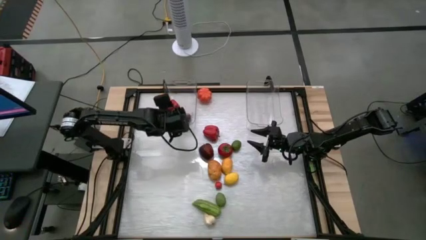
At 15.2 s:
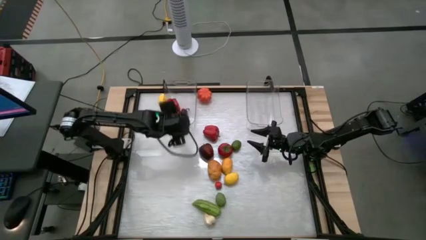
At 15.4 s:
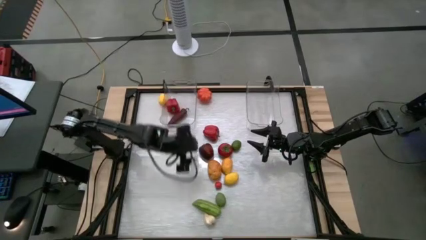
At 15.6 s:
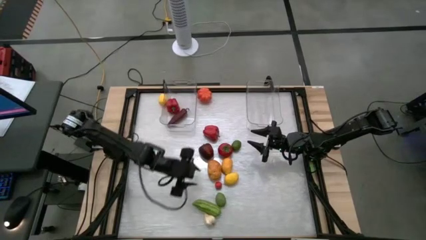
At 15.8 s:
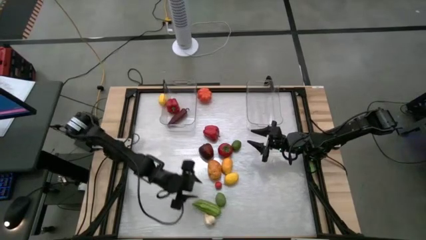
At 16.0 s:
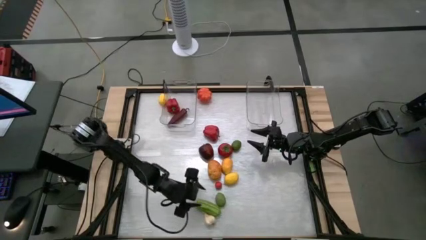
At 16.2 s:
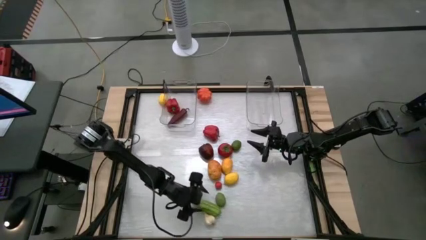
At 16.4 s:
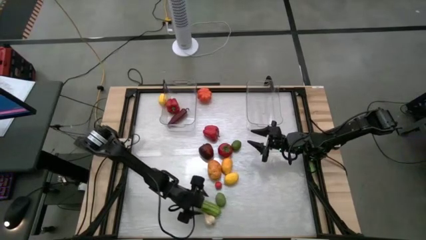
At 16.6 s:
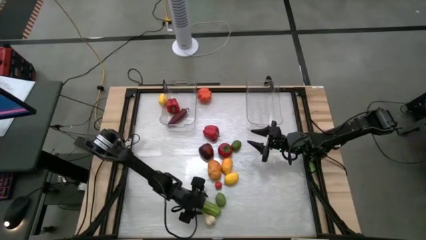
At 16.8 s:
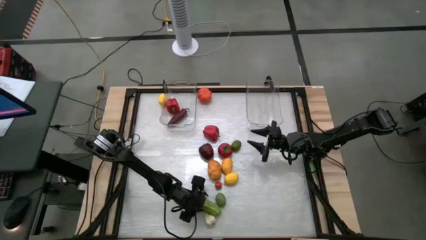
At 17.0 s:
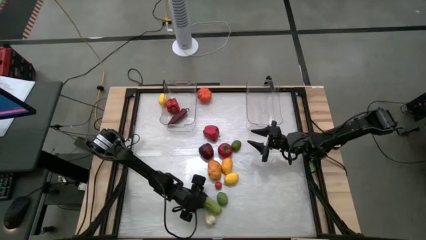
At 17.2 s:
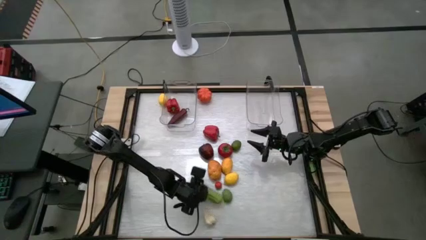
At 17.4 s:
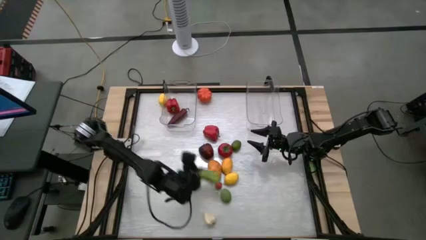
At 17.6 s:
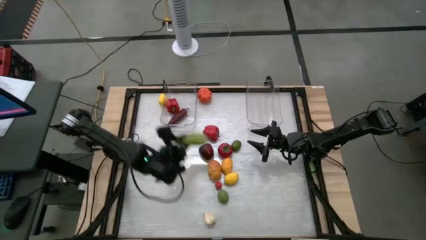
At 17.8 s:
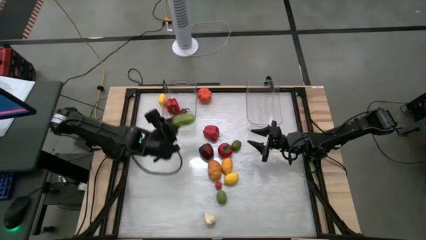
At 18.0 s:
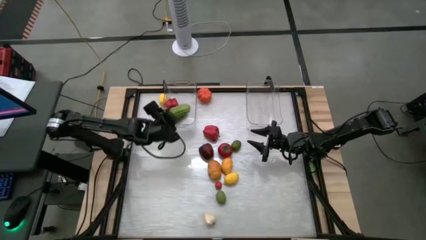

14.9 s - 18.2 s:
Task: Sort produce into baskets
Put the cucumber into the left transparent bin

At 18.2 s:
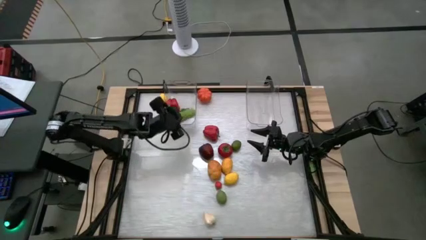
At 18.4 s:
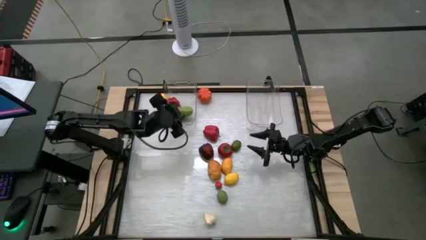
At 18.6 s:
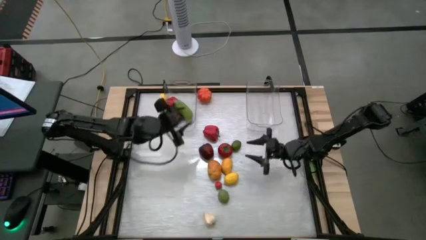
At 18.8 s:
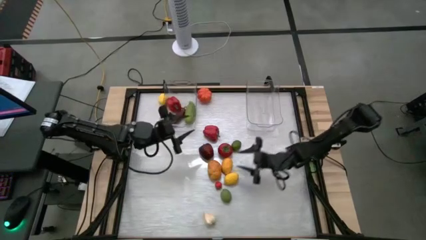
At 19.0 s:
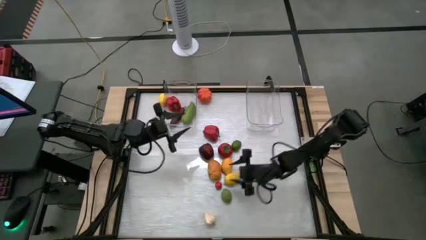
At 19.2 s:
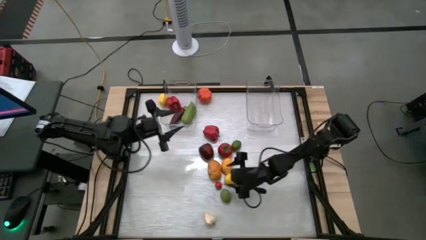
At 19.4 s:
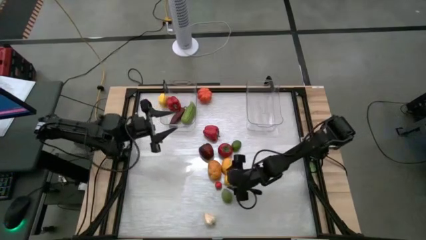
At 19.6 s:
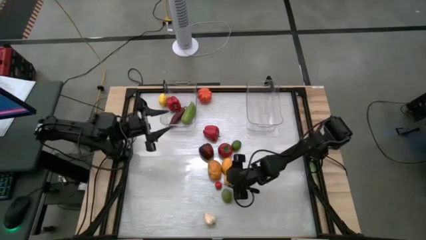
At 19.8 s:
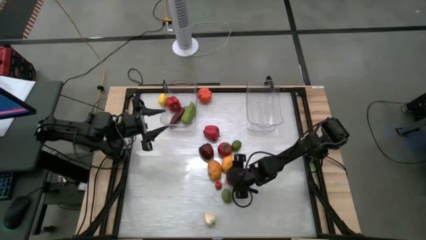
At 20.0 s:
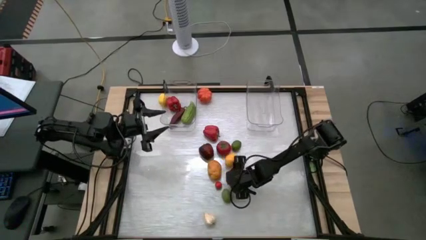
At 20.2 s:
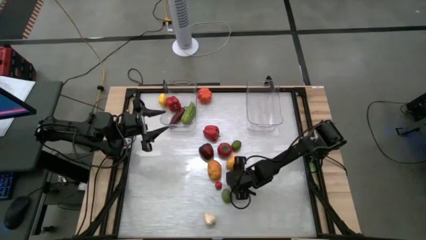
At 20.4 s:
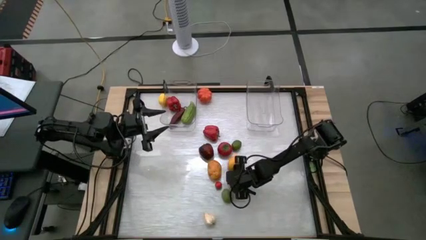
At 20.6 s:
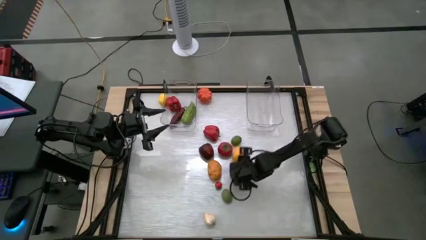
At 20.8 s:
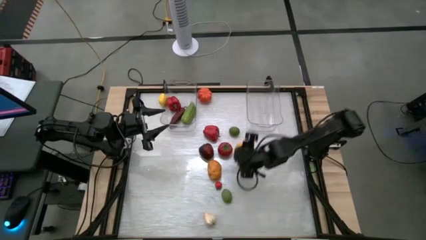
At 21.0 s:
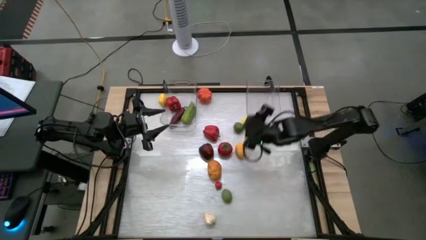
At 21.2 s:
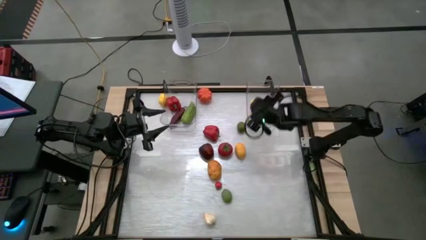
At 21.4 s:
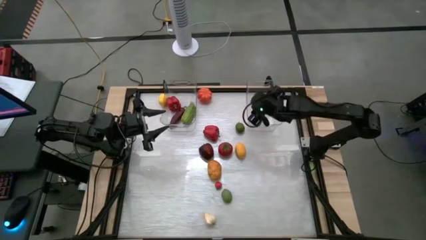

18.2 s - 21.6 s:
Put the bottom right lemon into the right transparent bin

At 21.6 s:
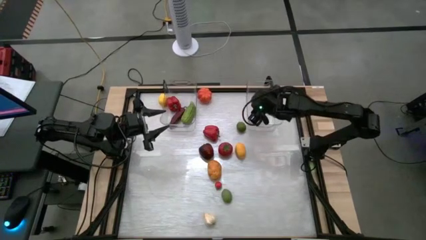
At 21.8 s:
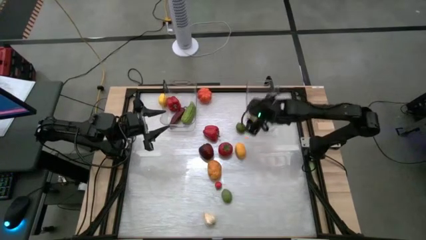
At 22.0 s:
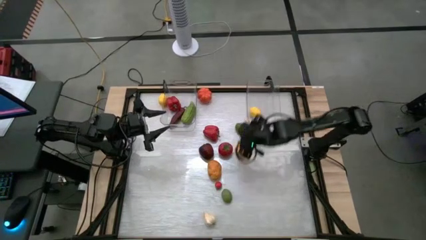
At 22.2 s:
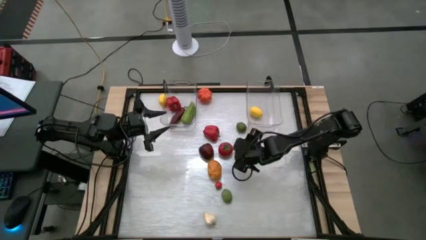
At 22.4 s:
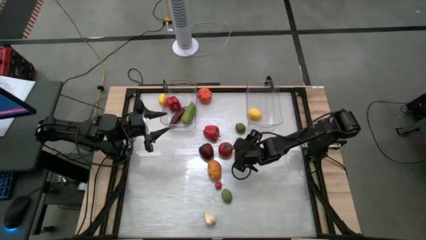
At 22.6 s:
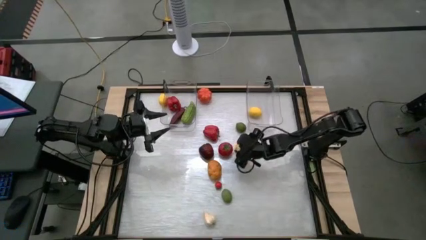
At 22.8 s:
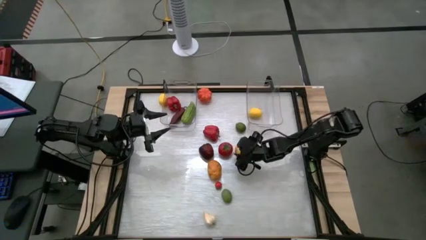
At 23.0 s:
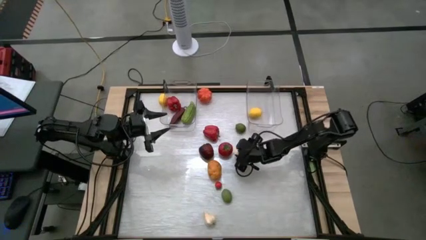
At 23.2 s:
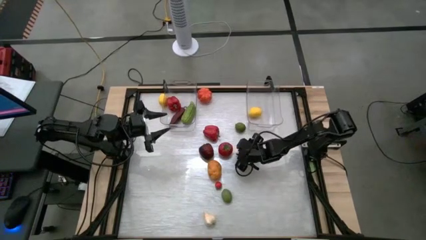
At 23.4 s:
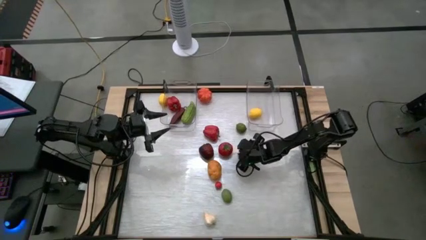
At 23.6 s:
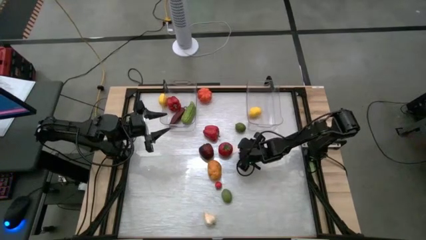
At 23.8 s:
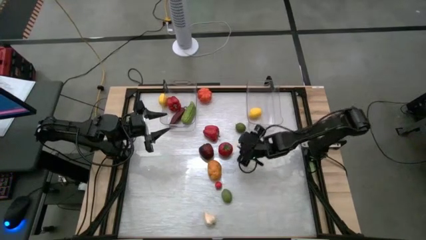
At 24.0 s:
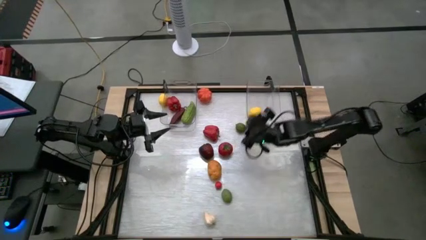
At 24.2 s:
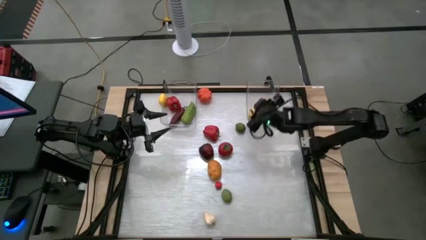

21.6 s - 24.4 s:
Put the bottom lemon into the right transparent bin

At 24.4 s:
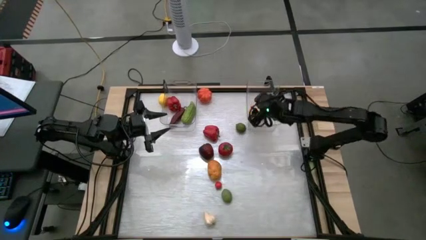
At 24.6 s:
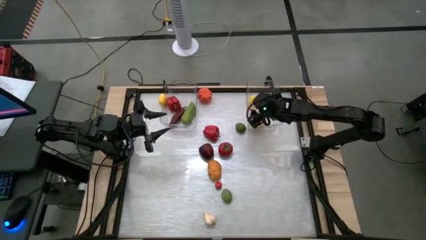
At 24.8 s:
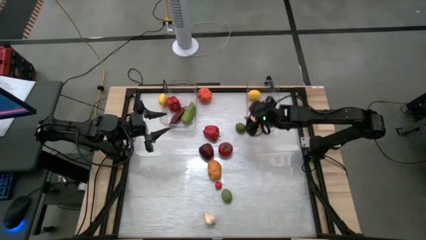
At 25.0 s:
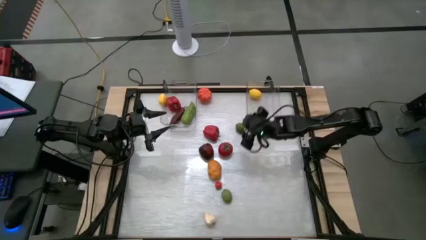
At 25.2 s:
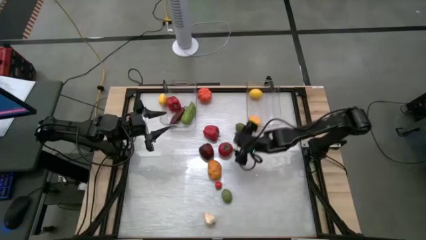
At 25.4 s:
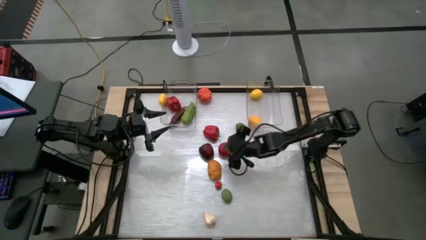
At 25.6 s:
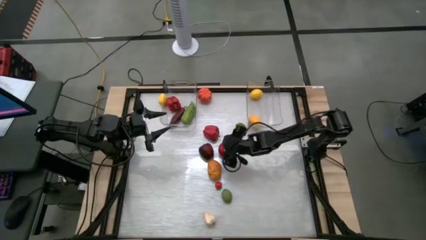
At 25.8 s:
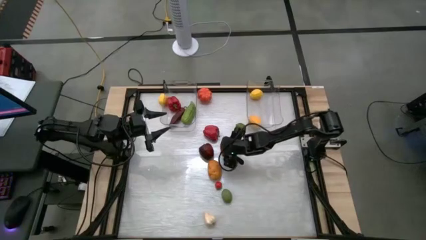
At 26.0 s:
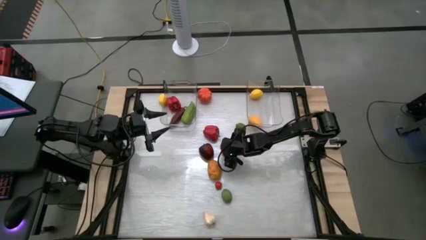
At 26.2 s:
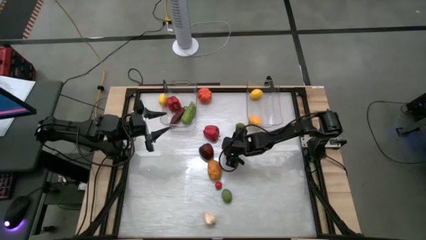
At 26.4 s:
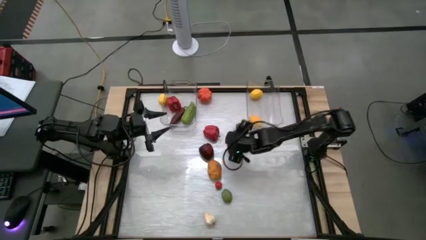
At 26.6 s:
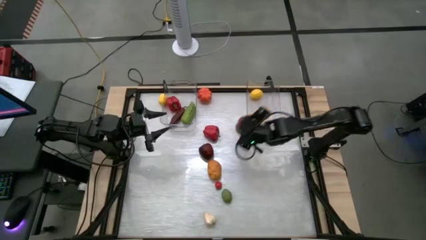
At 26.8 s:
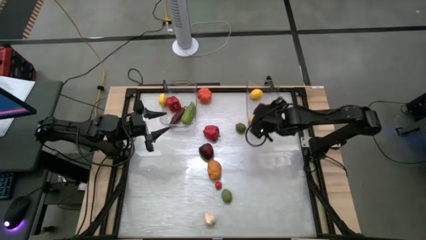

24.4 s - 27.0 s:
Put the top tomato into the right transparent bin

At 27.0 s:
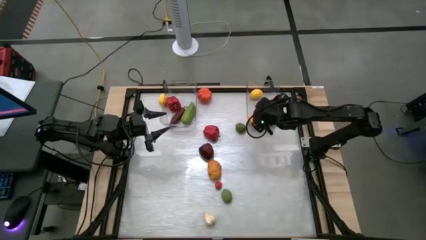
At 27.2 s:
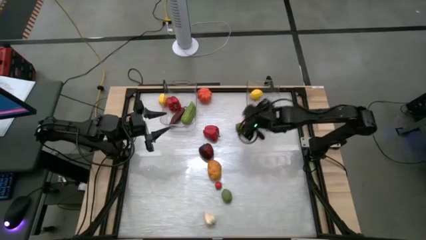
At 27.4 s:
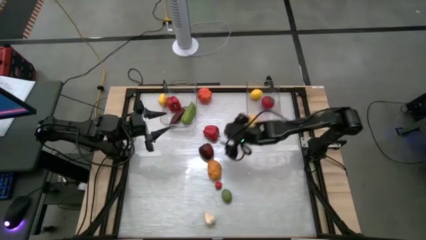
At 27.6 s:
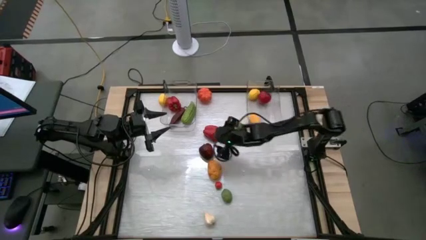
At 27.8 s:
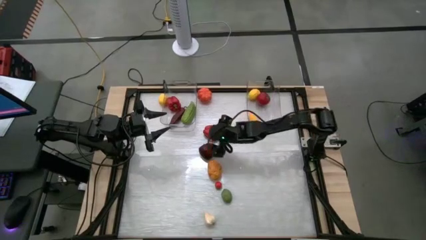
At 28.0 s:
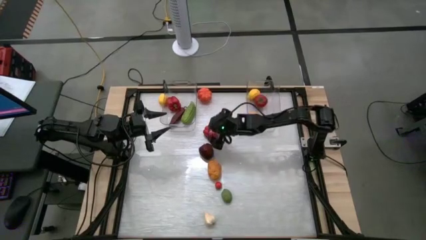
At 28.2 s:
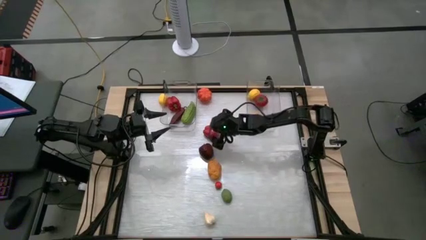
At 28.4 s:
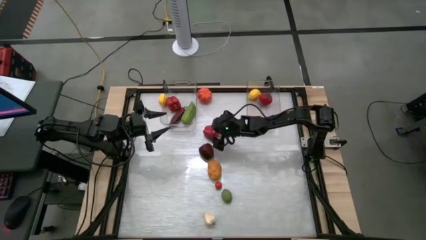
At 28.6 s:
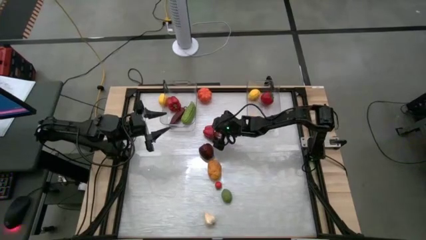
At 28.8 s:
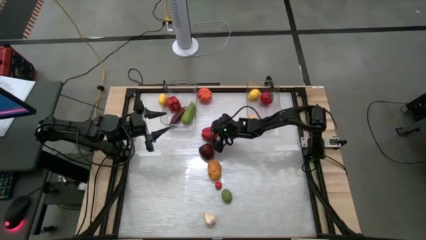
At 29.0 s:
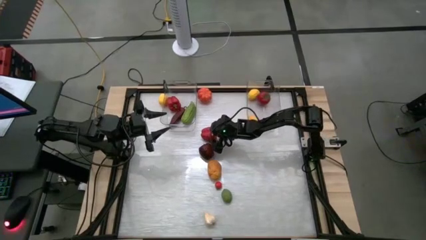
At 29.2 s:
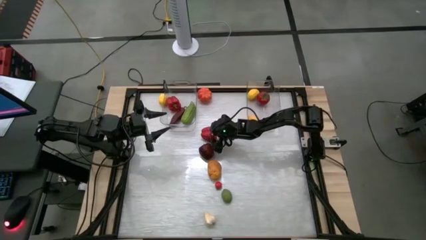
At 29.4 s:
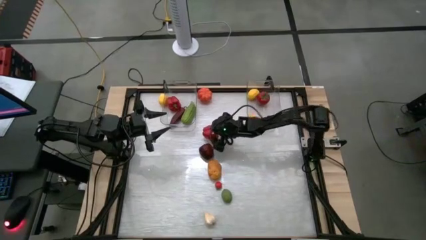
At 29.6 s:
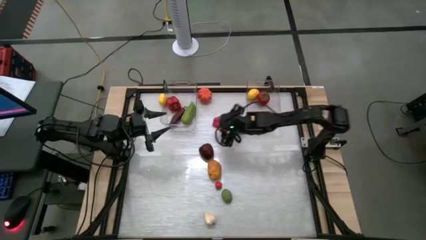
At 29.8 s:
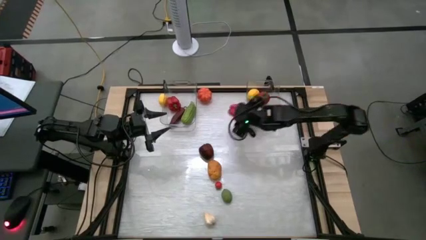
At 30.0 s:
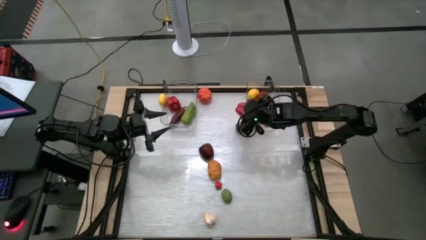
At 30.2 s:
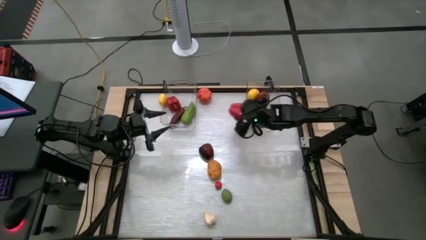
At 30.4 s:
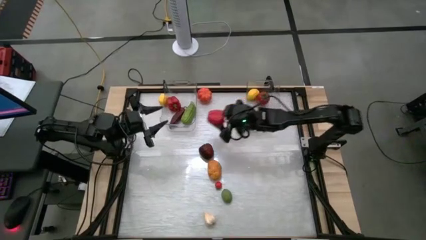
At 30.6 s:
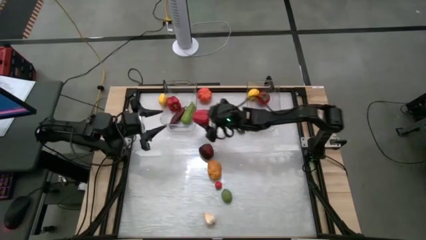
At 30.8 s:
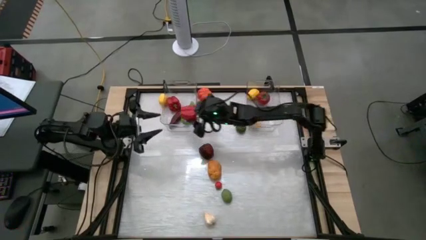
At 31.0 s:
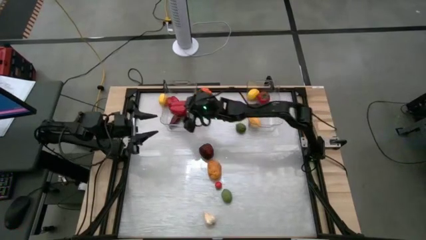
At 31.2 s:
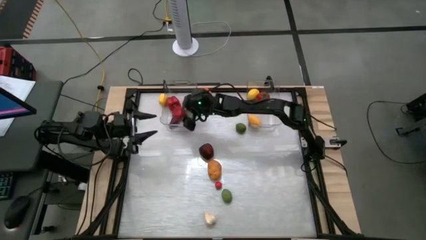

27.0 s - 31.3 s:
Put the bell pepper into the left transparent bin

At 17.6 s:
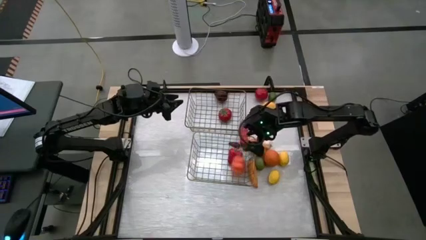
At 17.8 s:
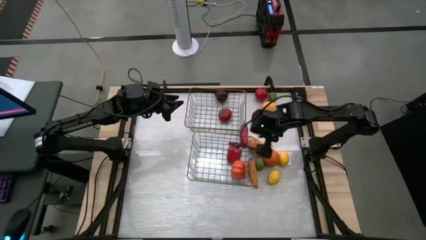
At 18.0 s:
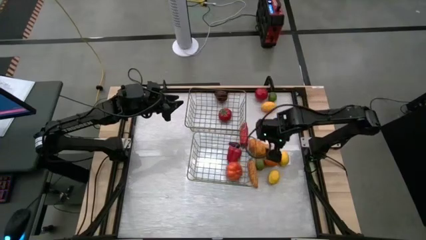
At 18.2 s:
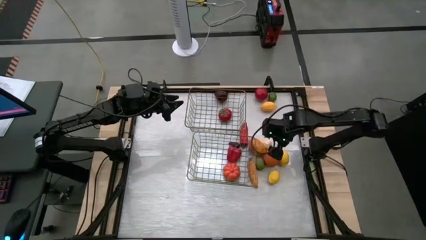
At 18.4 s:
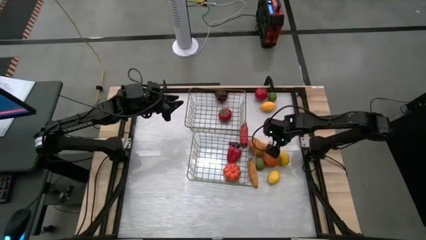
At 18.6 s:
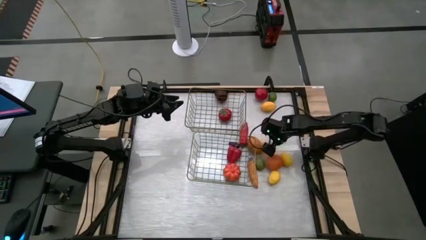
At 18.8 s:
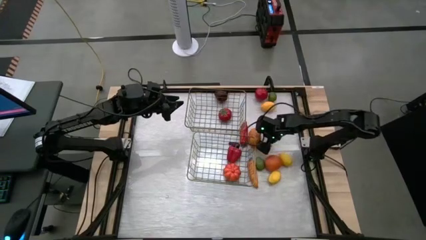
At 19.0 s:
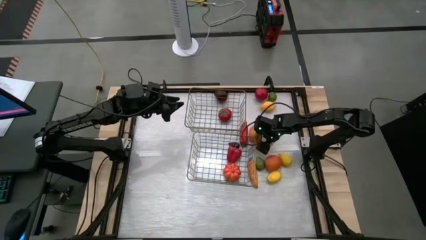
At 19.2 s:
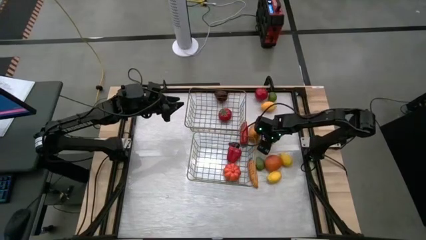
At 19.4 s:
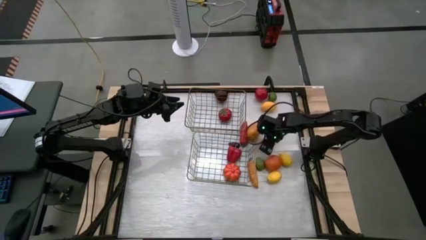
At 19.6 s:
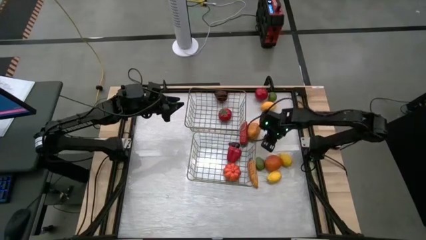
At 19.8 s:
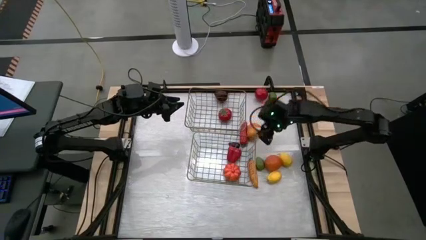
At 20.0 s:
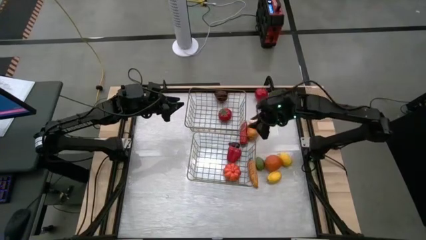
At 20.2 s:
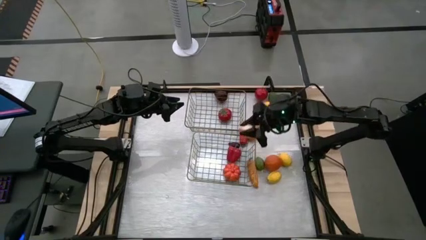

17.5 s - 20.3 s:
Task: Sort produce into baskets
Put the white garlic vegetable into the bottom wire basket
